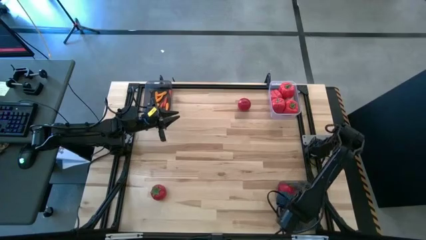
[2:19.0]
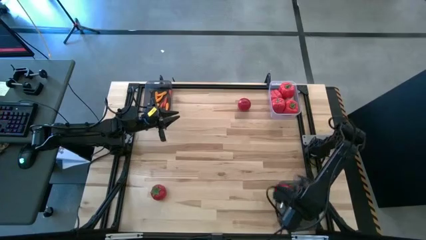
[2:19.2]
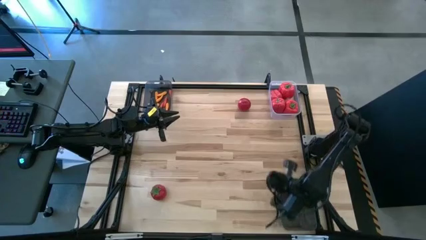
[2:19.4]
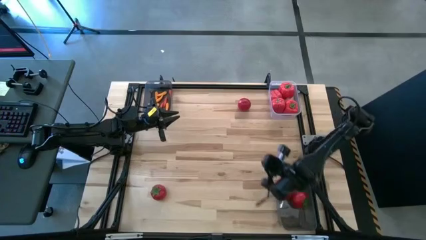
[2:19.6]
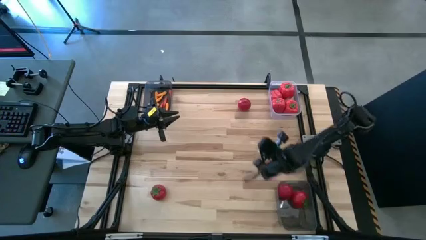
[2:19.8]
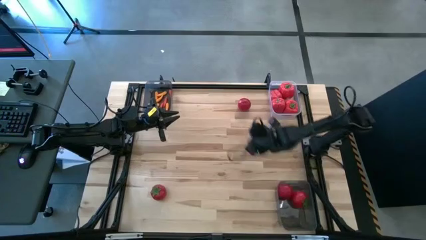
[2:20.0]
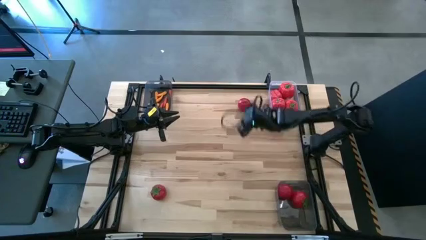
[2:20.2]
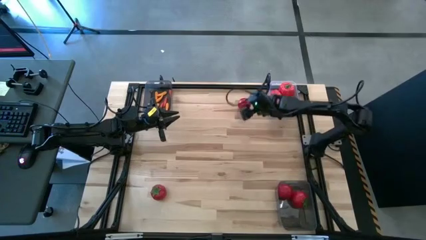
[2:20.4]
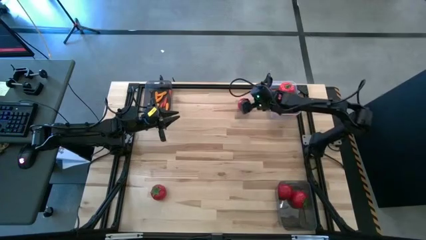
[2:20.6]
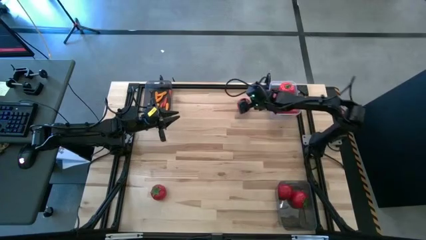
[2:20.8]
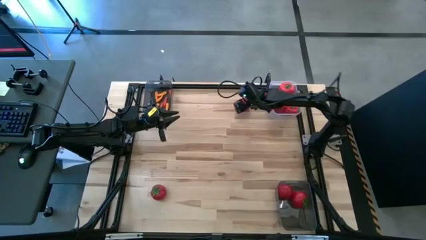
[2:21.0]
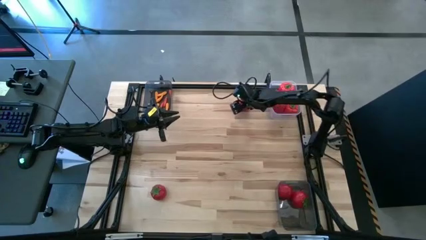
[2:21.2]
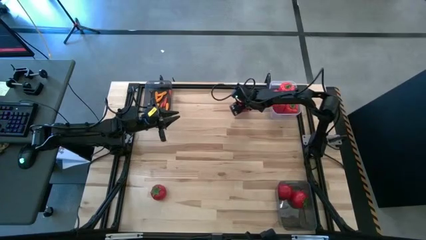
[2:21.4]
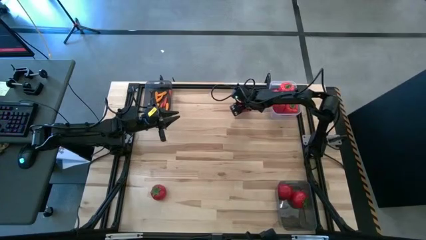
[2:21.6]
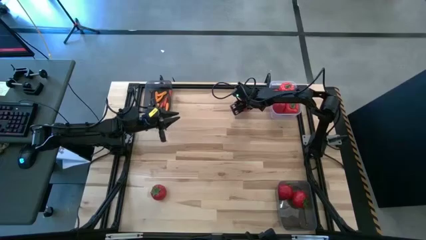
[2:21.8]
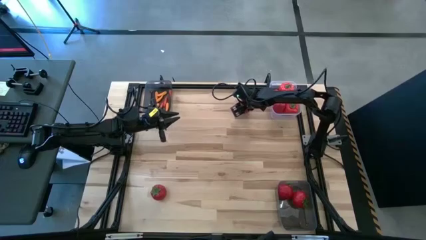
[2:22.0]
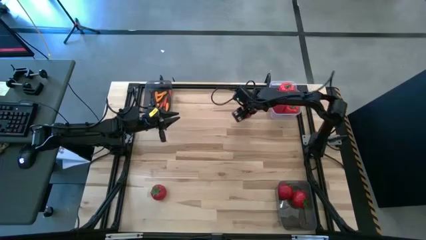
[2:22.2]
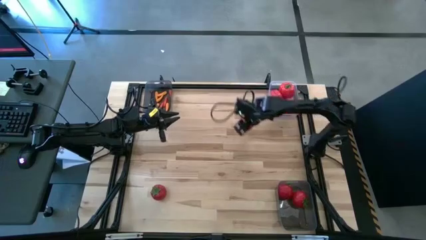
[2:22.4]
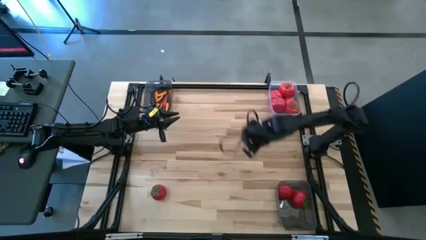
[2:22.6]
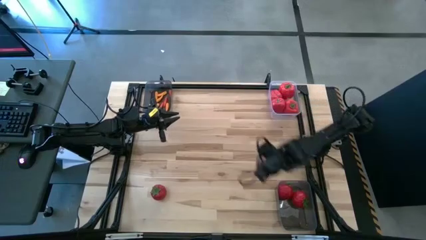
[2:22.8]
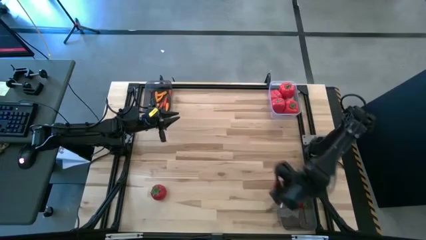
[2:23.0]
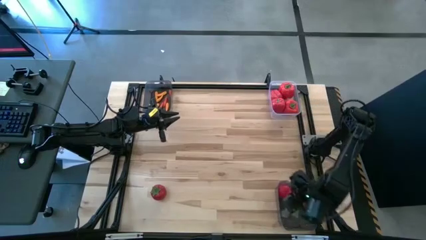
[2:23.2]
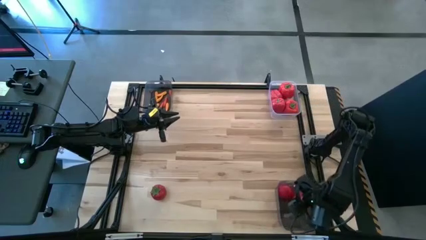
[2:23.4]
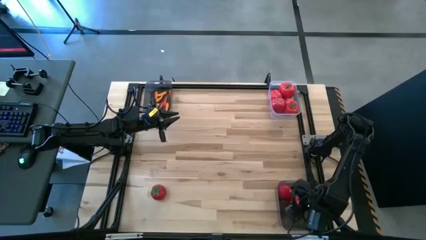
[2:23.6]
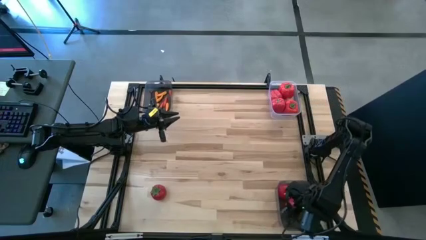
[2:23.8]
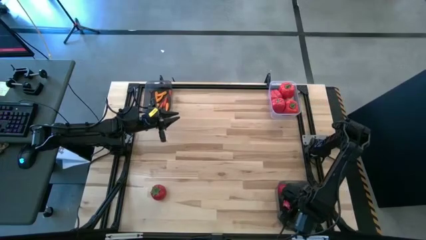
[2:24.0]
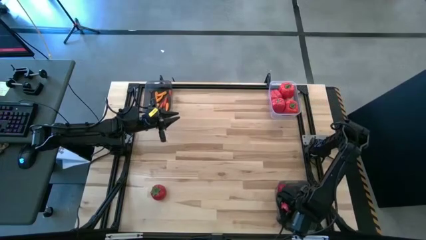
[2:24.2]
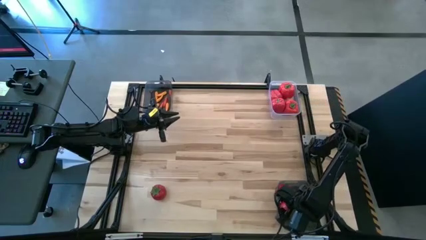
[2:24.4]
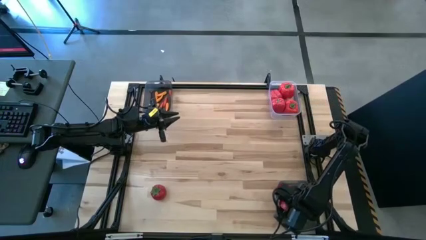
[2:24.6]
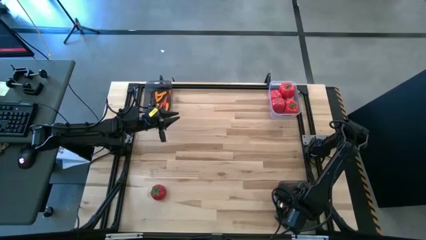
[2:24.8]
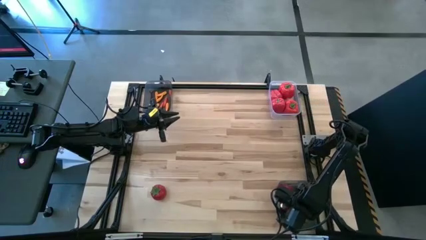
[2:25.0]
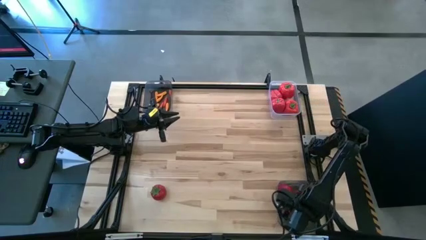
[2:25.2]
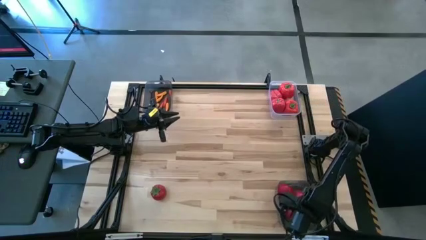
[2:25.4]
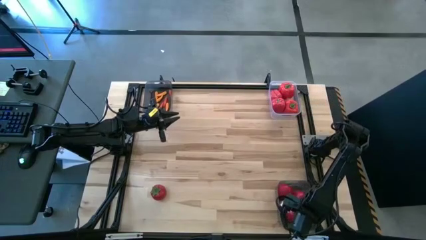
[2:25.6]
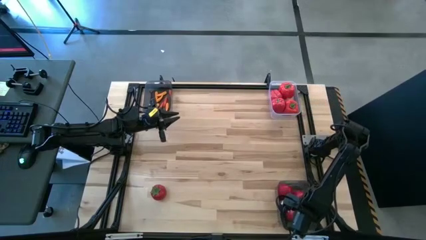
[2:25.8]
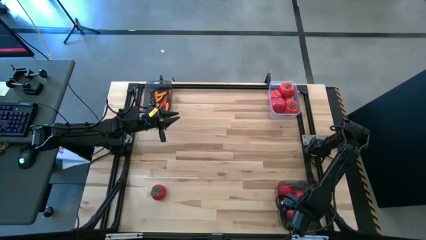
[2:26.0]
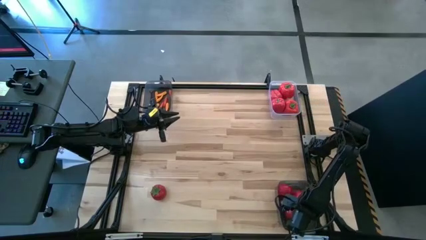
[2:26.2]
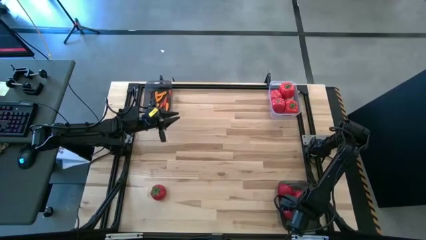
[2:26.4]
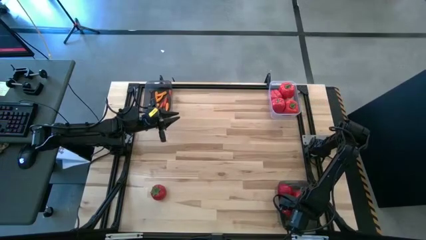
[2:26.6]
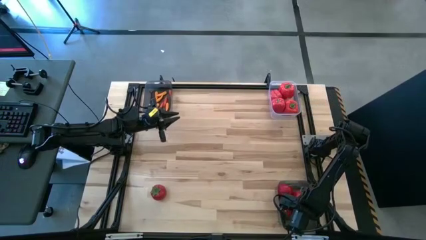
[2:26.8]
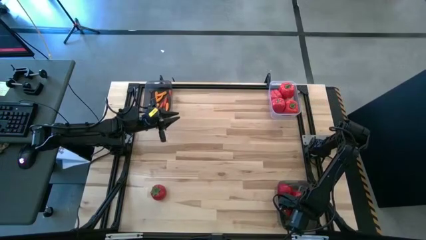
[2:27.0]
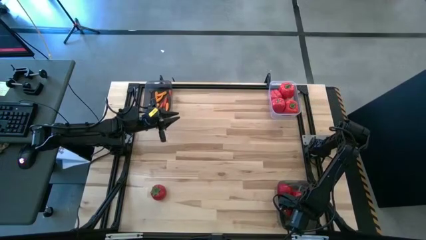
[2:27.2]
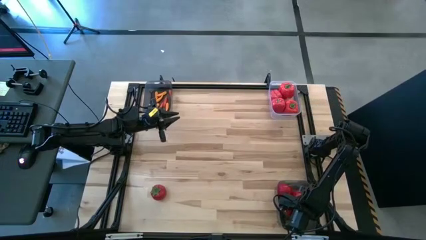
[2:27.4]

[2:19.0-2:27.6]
Task: Sort produce into baskets
Put the tomato into the bottom black bin

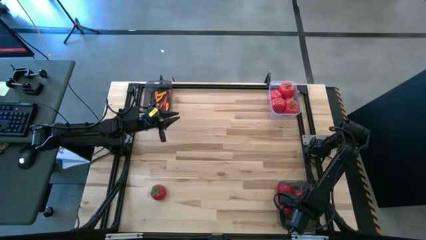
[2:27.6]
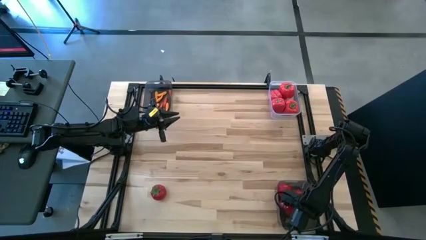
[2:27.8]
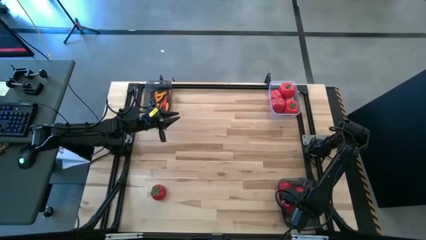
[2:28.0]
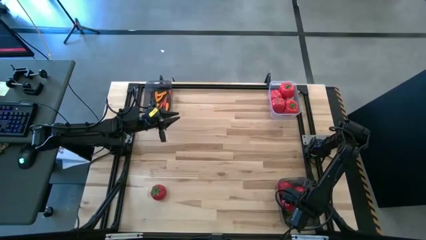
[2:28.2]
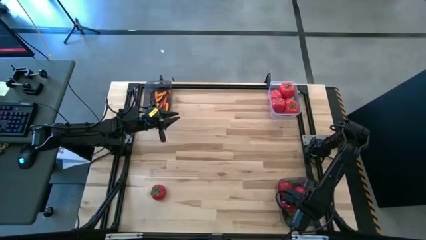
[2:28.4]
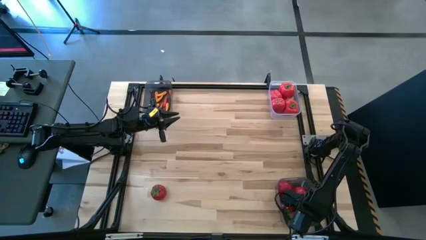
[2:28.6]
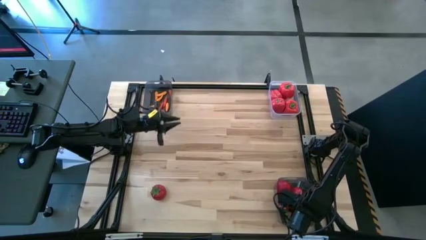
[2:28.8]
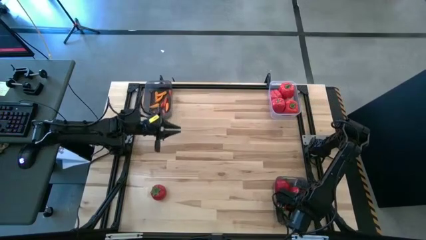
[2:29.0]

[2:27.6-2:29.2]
Adjust the tomatoes in the bottom black bin

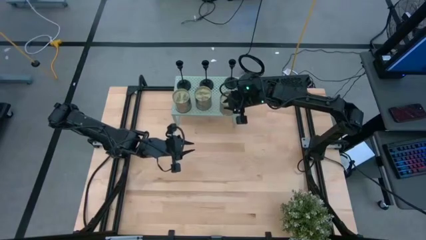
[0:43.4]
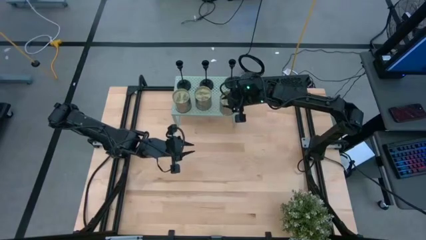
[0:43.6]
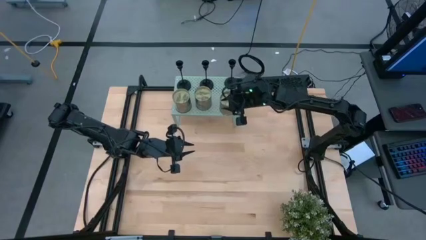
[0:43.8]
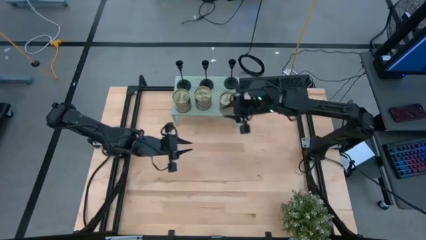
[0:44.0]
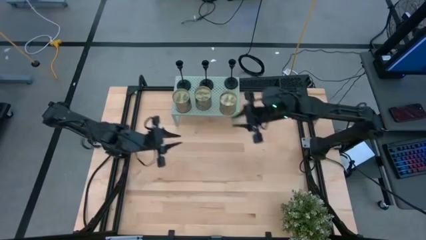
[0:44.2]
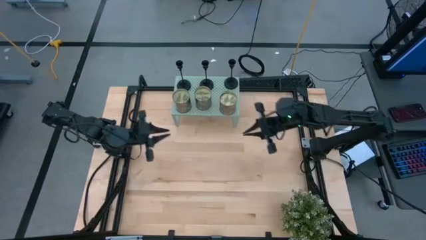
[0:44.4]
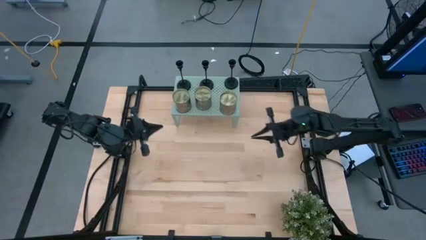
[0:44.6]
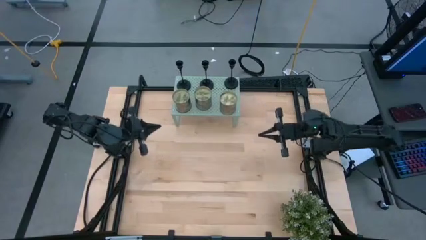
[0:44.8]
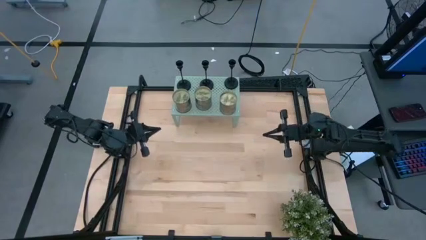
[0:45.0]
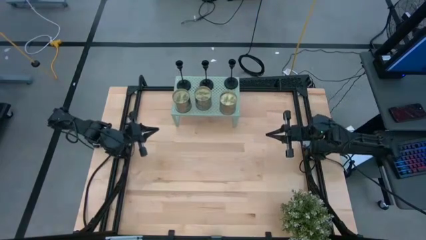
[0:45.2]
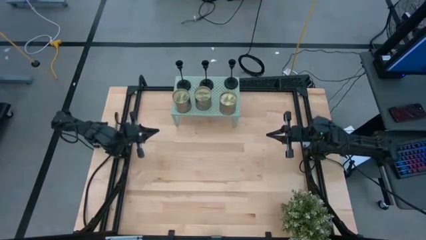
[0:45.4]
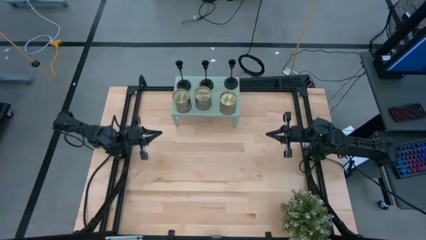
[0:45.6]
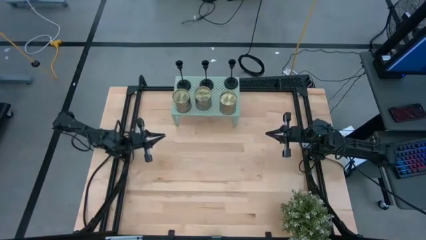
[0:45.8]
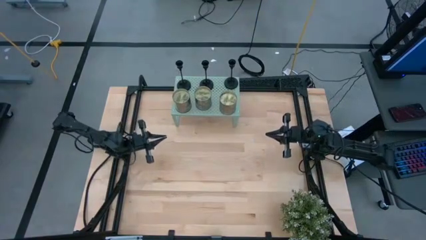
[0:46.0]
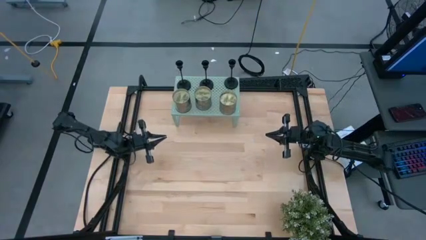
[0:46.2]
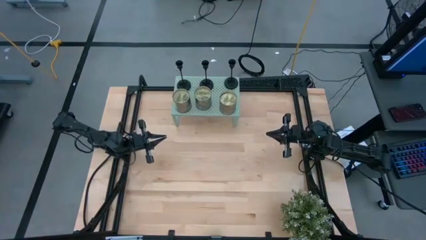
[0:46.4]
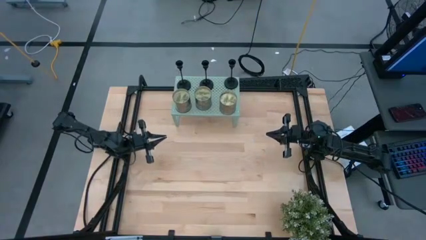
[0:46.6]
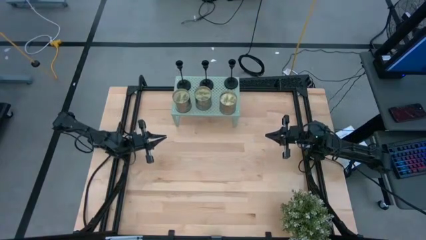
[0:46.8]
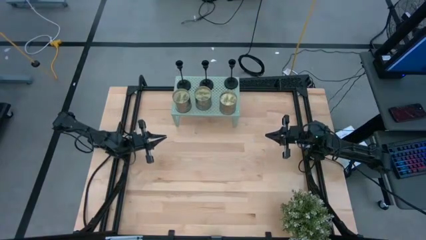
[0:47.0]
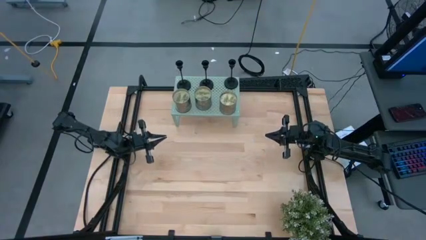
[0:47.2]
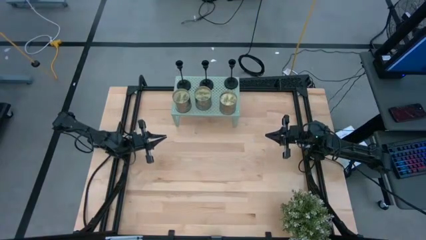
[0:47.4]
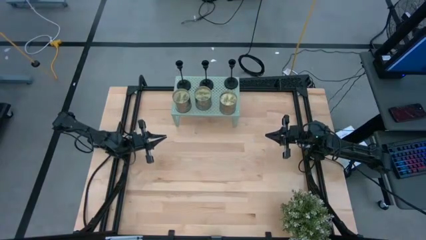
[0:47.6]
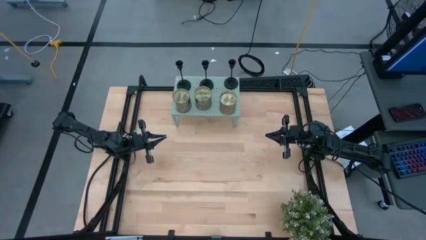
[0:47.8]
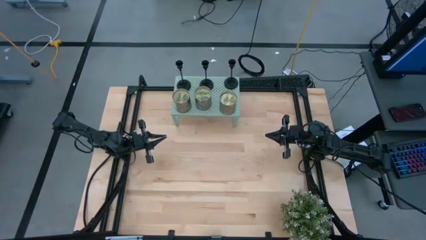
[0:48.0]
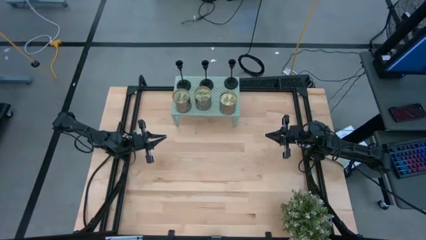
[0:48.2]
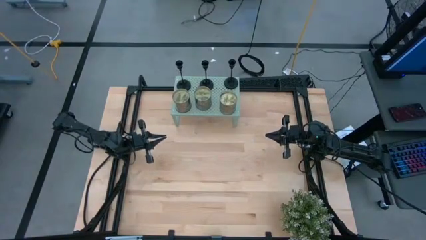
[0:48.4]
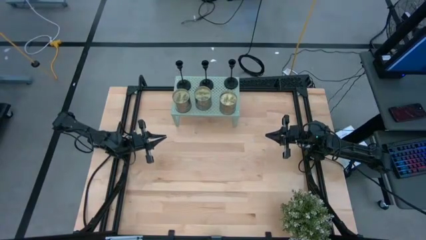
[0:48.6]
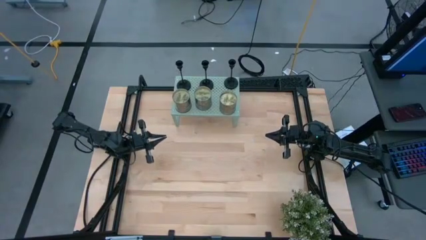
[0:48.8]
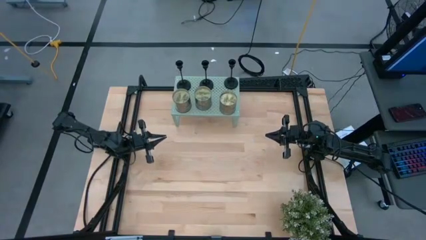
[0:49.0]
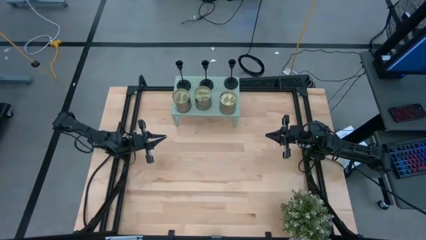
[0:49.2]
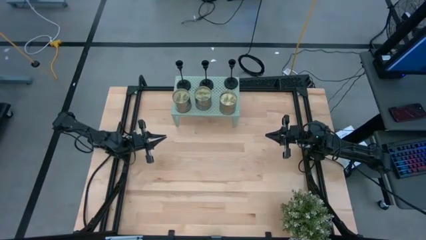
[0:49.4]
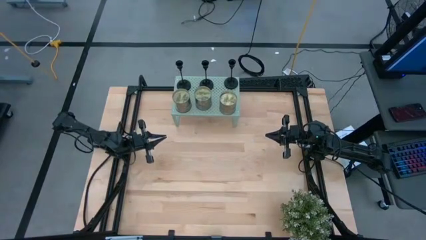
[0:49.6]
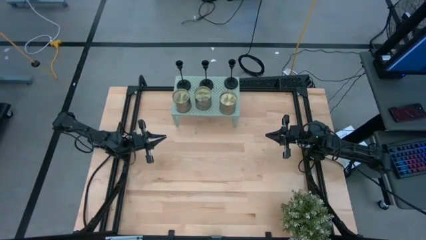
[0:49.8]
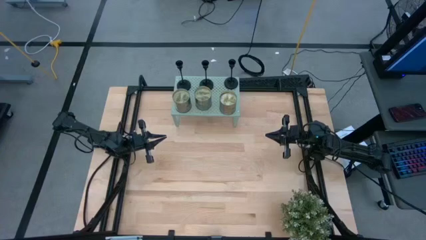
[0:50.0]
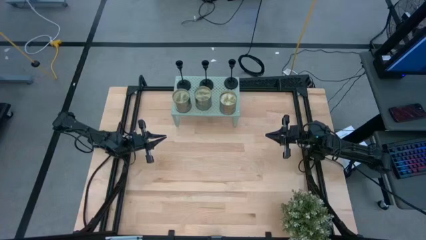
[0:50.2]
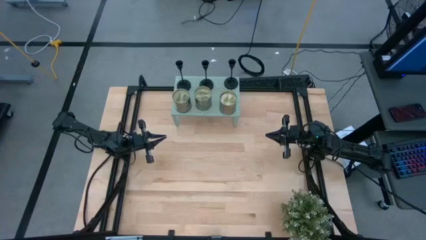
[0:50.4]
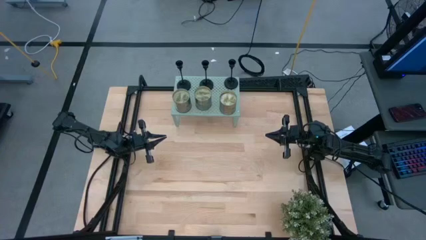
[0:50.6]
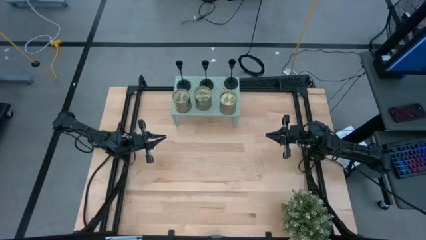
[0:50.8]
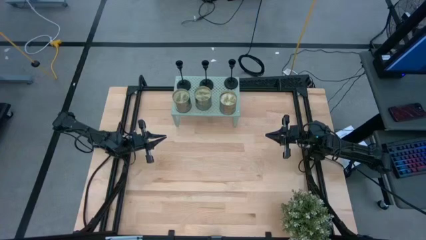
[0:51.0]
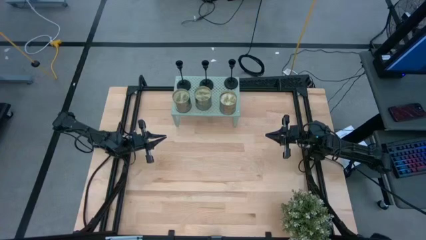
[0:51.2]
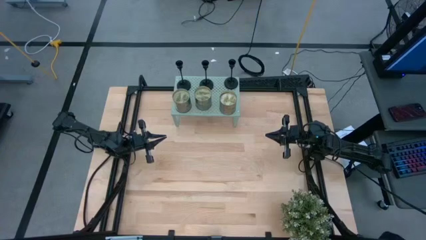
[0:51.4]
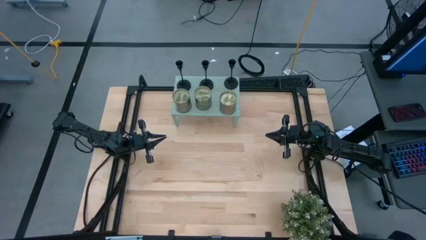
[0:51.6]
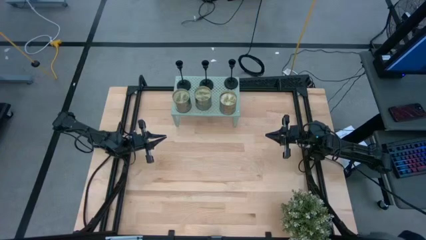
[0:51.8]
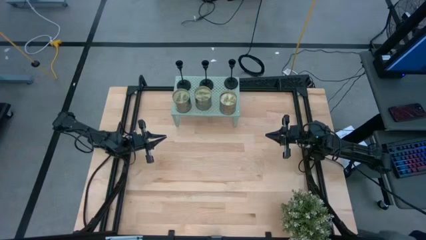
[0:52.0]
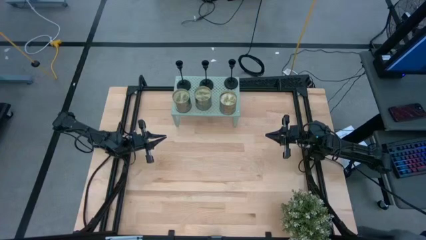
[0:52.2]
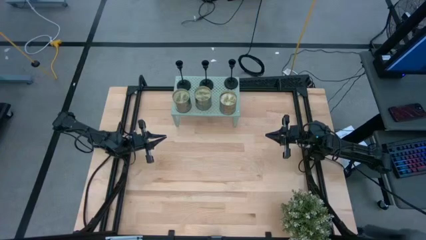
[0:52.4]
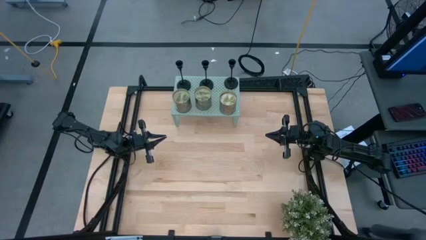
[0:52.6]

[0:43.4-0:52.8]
Task: Pick & Place candle stick holders
Return to Home Position
